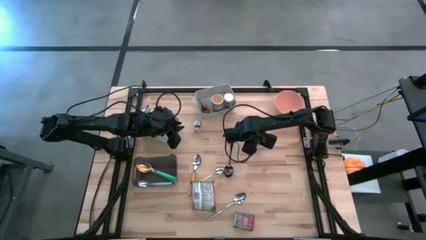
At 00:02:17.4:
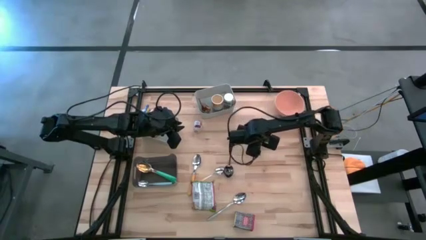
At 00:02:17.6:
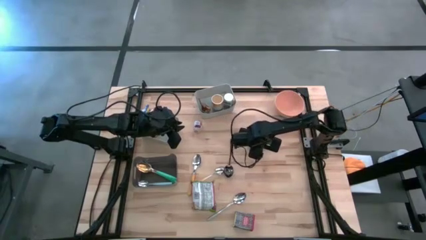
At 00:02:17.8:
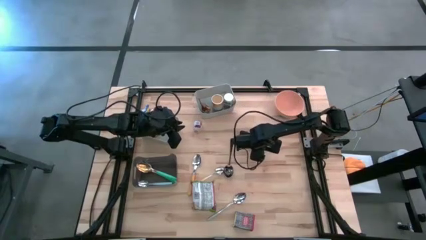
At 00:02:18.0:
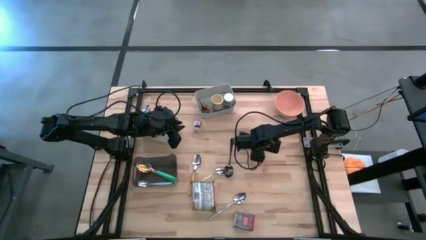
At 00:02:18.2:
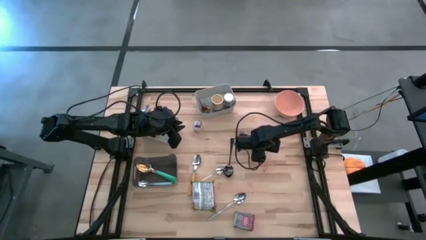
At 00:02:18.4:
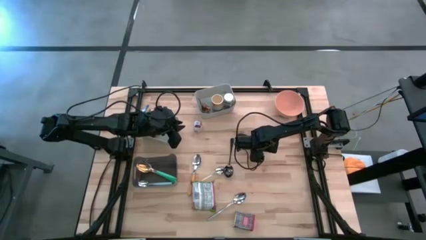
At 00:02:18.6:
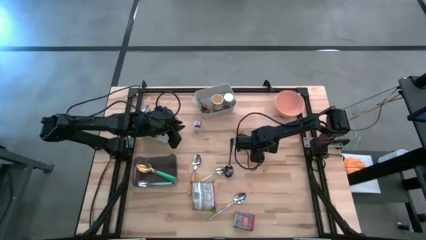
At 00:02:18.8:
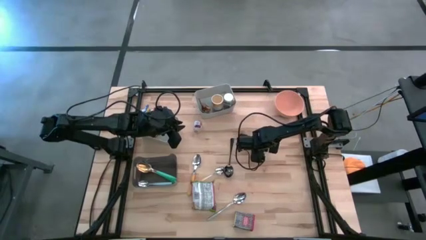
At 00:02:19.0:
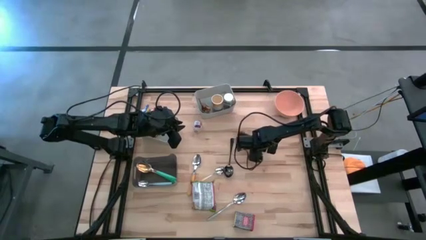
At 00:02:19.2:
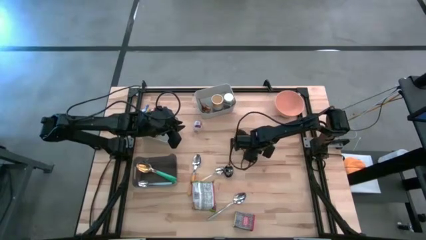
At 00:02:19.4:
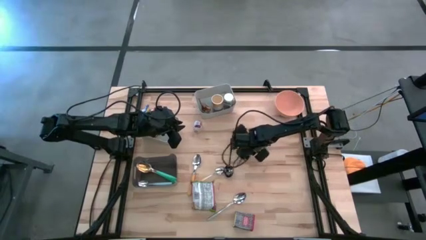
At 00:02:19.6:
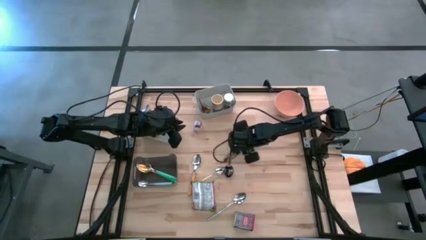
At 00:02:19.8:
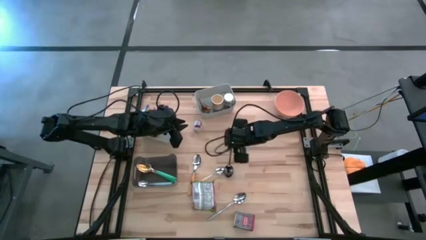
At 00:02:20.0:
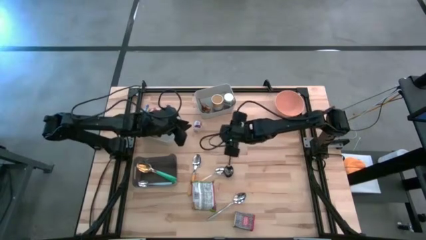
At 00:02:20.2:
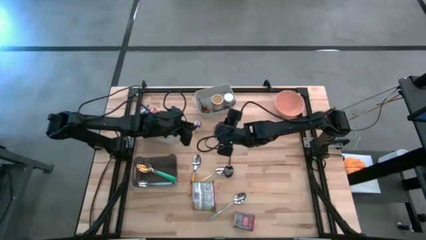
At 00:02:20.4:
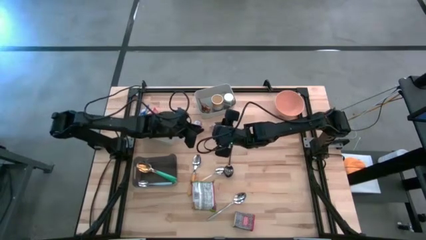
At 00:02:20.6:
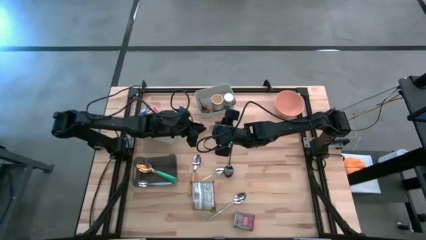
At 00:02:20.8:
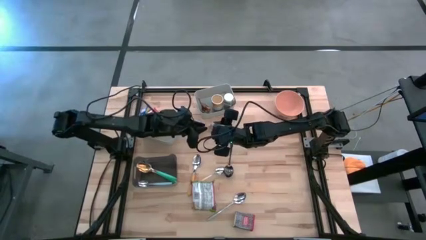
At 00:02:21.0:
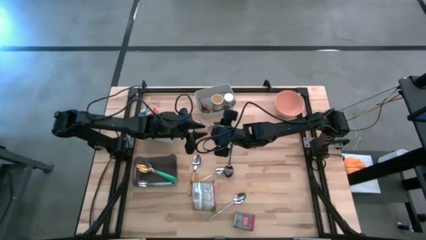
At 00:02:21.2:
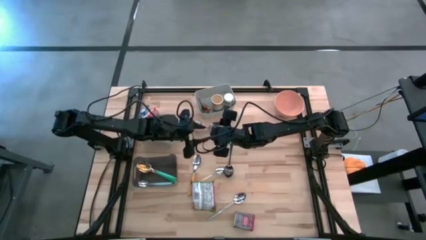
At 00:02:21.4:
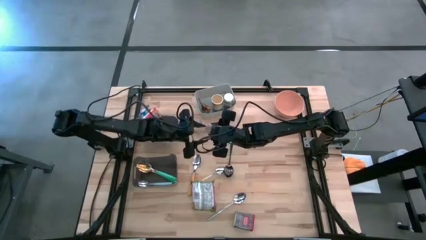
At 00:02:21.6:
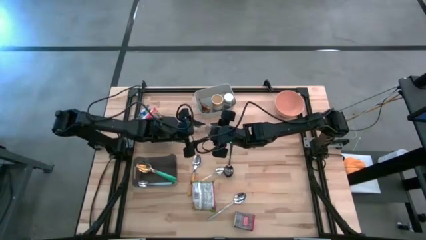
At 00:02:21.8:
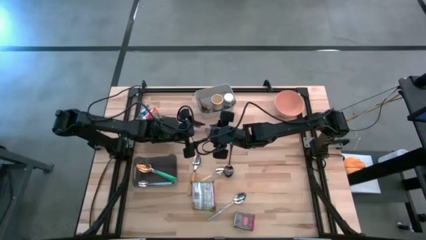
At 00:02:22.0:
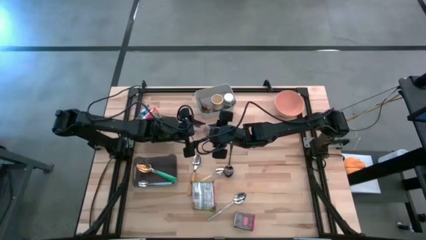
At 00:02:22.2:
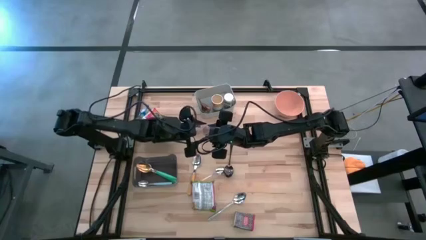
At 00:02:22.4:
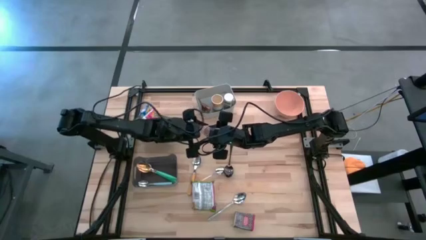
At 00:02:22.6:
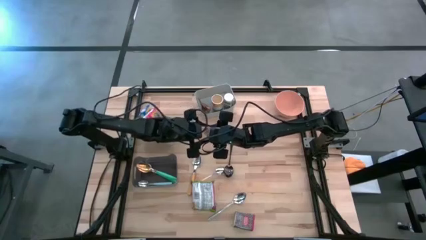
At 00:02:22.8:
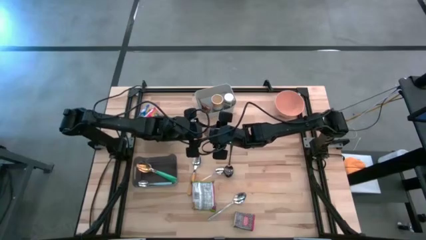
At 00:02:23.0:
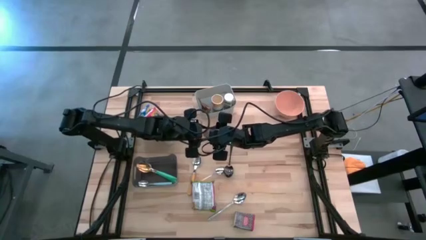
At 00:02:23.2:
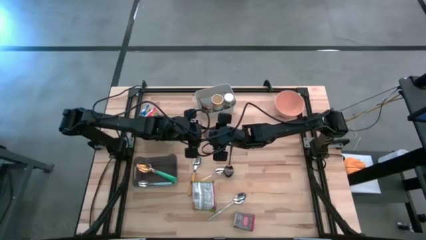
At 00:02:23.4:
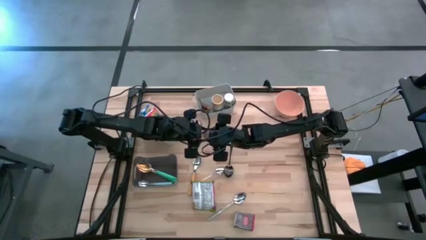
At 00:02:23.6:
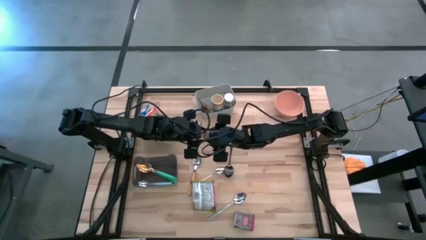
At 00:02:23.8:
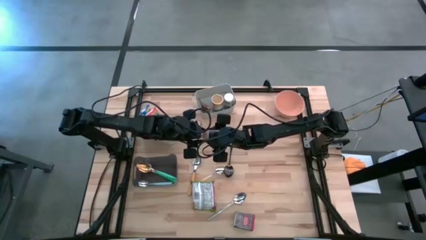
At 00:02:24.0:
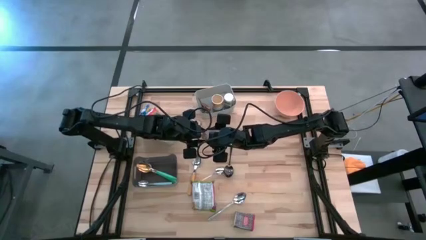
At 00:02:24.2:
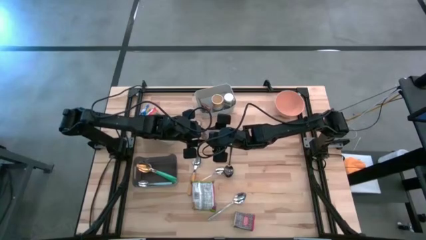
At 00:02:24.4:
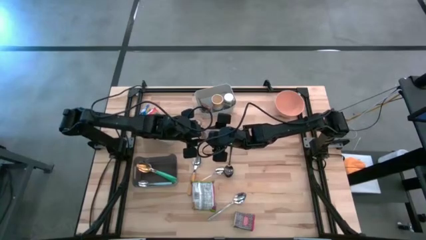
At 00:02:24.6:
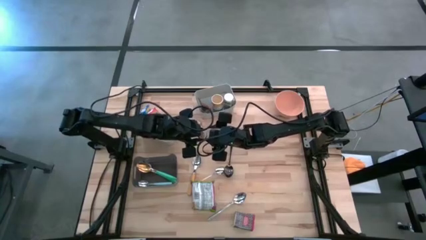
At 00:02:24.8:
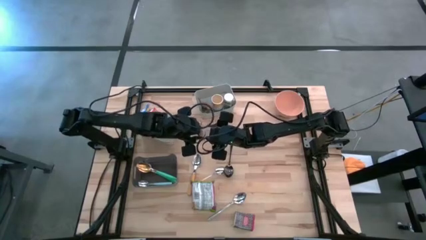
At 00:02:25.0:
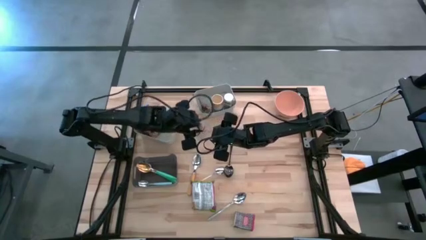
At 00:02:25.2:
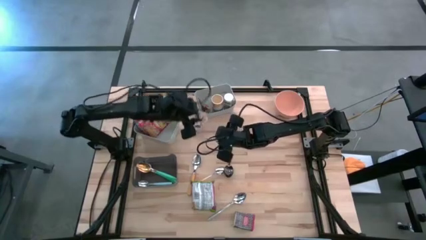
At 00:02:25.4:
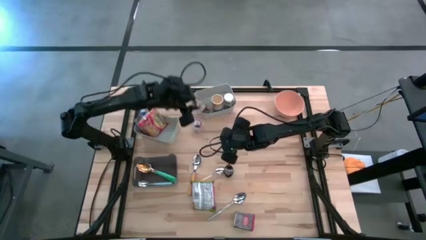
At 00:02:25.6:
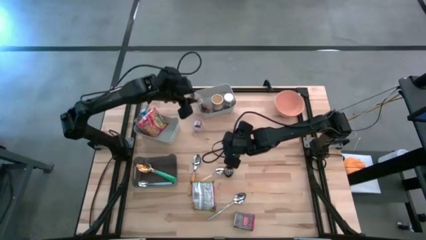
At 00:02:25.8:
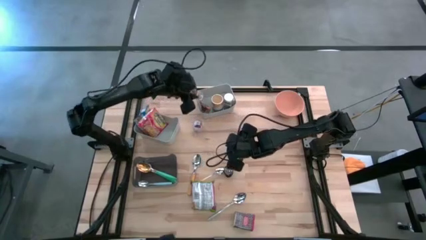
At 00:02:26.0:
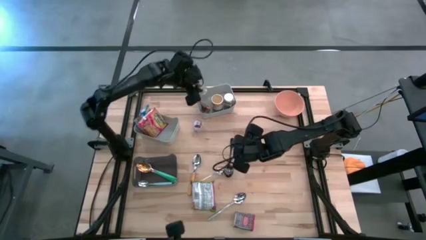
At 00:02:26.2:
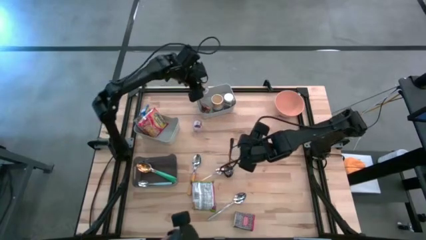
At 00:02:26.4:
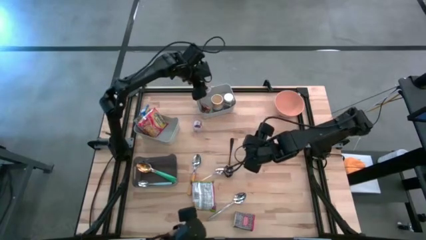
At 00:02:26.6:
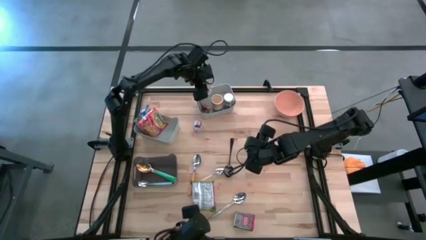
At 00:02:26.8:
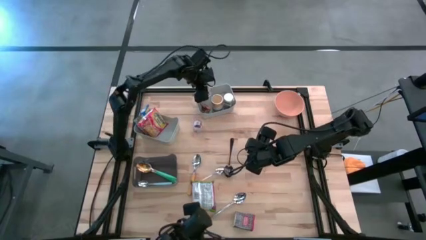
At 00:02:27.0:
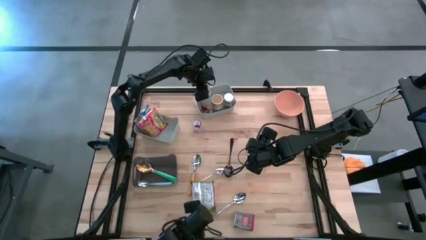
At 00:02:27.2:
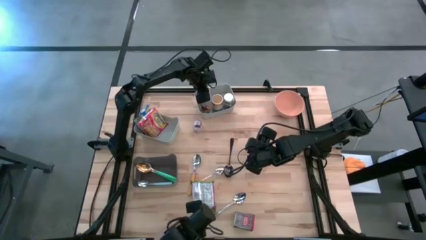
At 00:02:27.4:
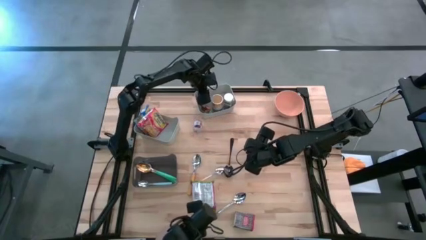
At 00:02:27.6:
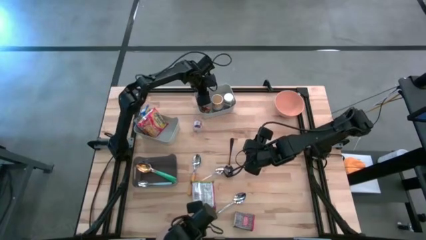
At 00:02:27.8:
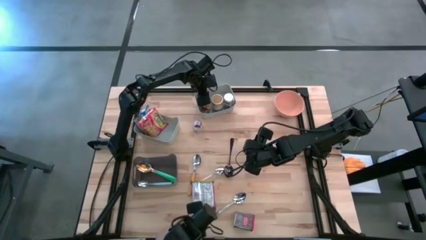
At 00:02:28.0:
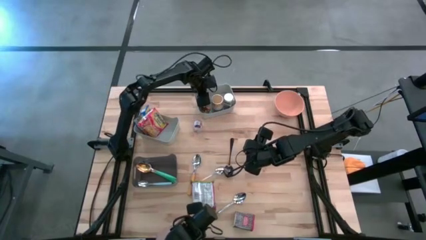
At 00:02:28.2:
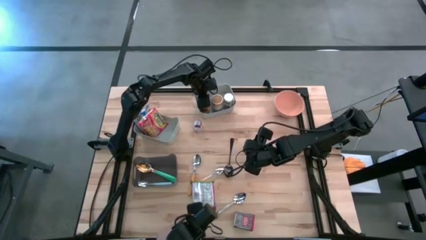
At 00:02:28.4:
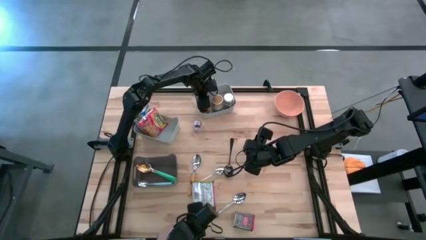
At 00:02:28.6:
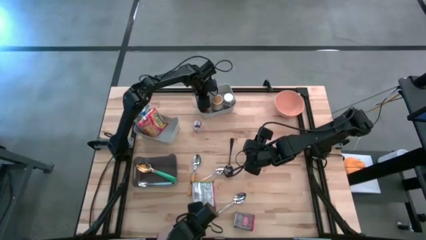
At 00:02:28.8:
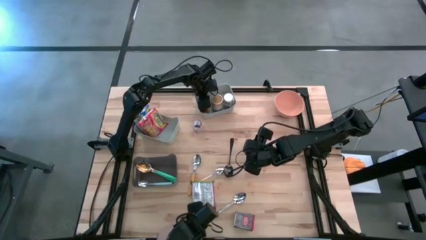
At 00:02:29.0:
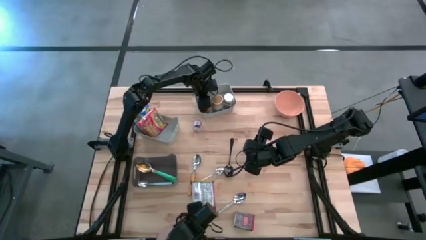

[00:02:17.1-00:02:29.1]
Put the right brown spice bottle into the top gray bin
